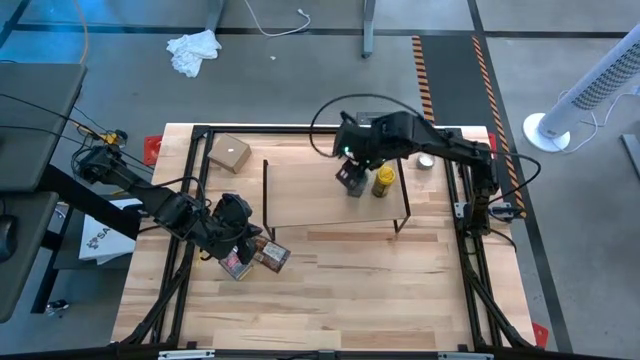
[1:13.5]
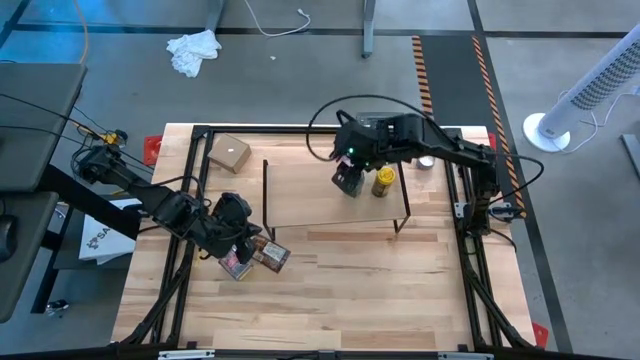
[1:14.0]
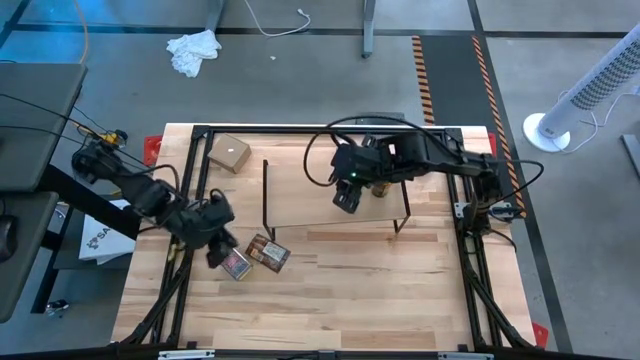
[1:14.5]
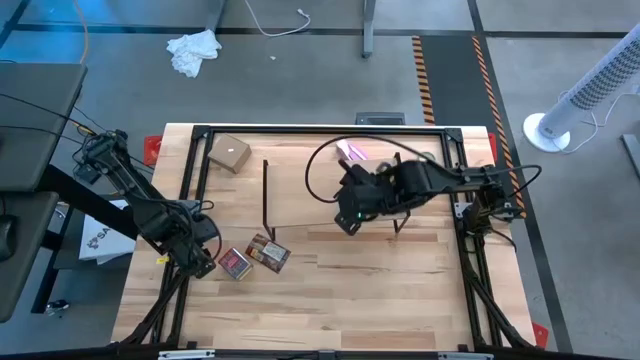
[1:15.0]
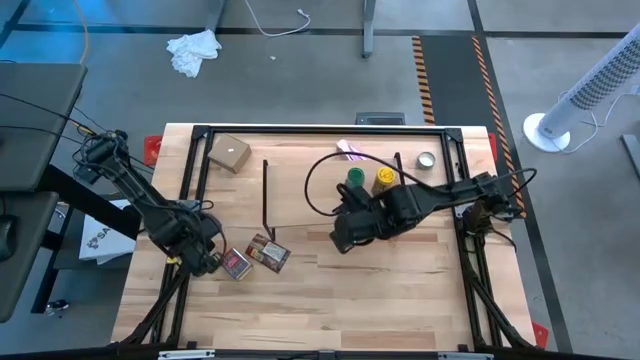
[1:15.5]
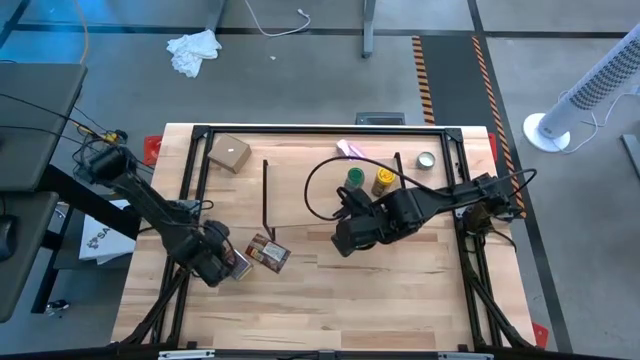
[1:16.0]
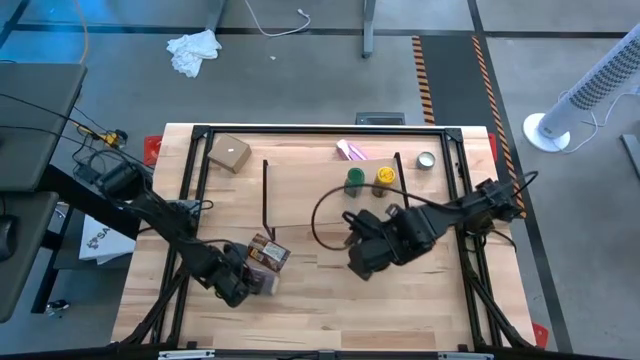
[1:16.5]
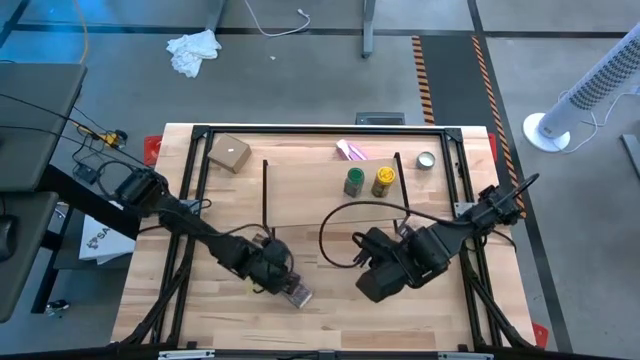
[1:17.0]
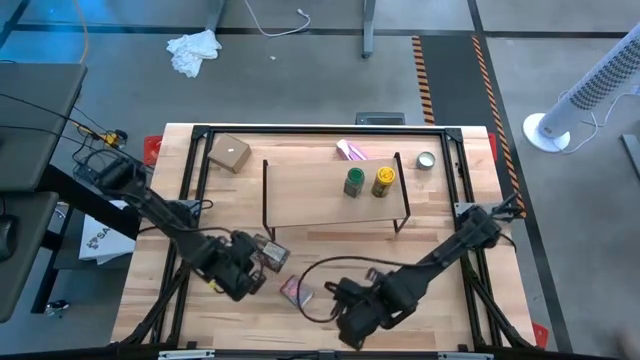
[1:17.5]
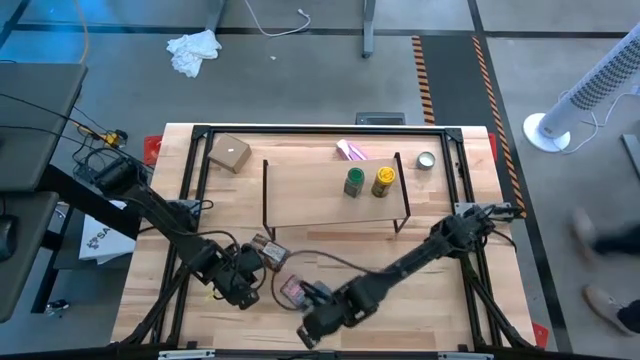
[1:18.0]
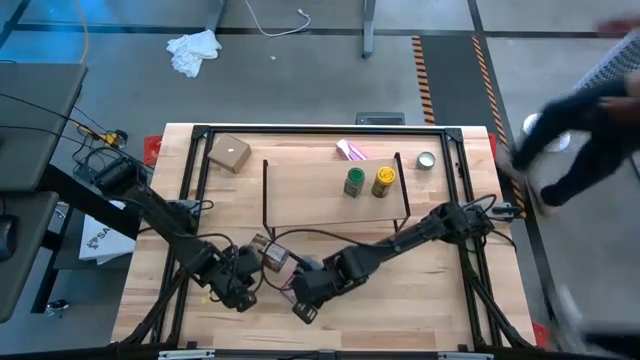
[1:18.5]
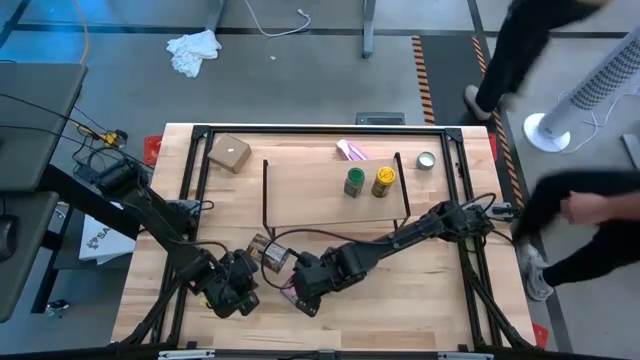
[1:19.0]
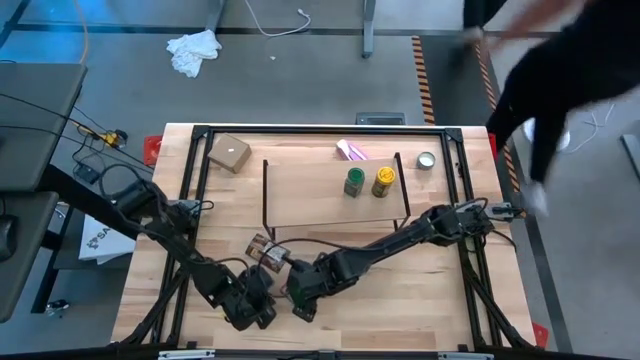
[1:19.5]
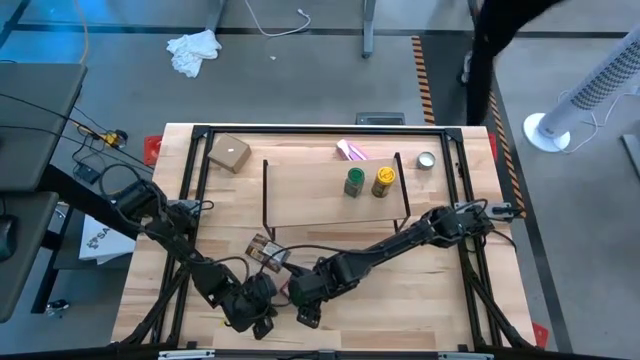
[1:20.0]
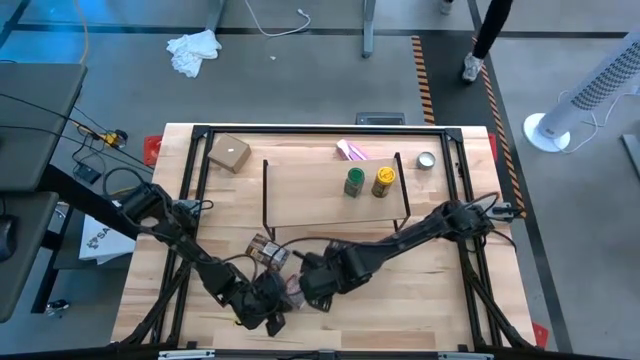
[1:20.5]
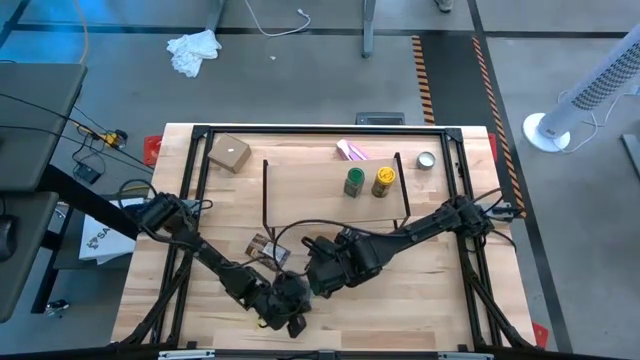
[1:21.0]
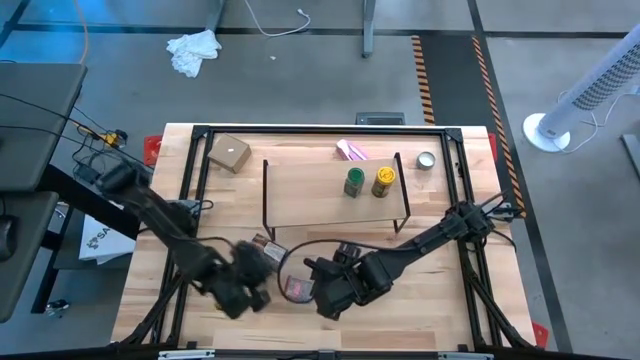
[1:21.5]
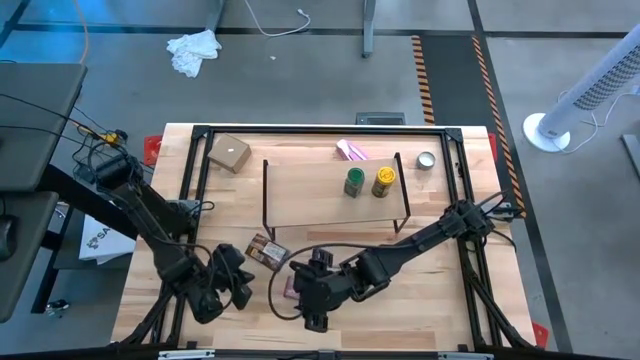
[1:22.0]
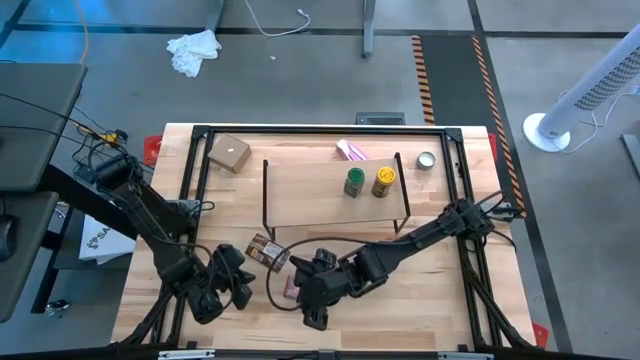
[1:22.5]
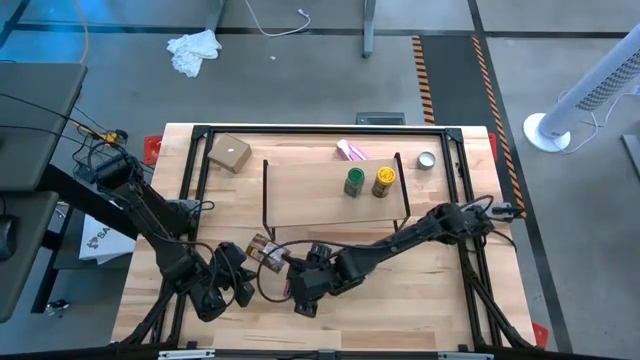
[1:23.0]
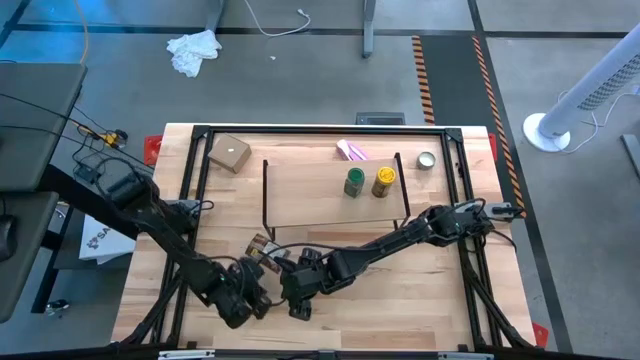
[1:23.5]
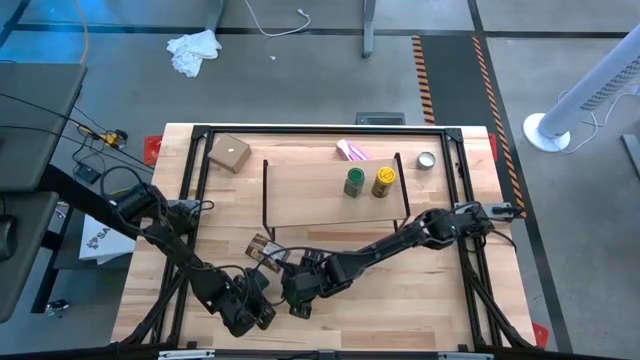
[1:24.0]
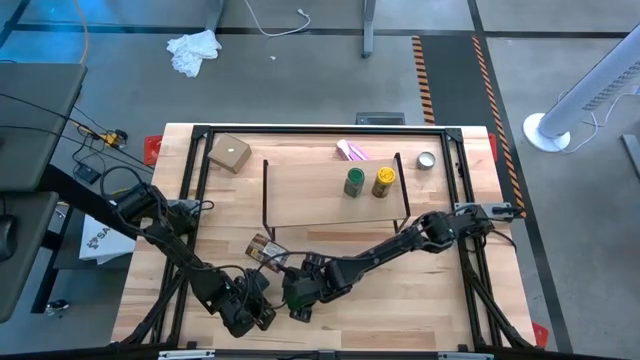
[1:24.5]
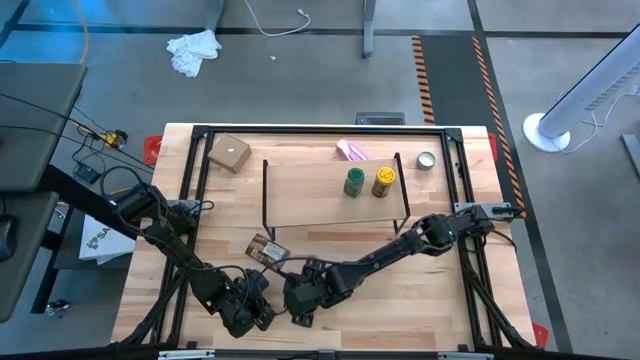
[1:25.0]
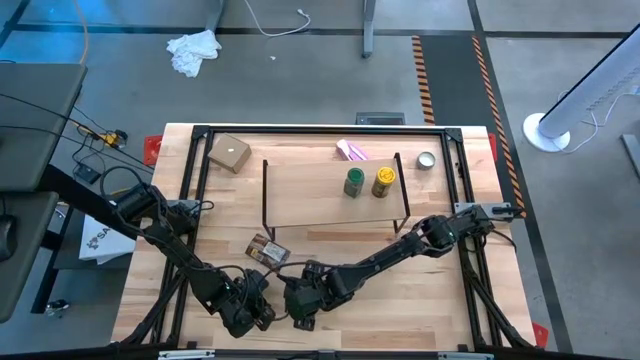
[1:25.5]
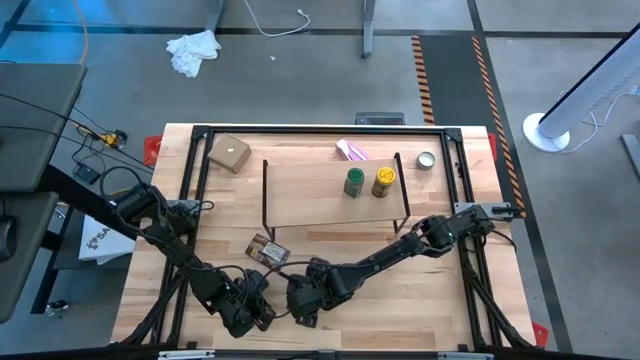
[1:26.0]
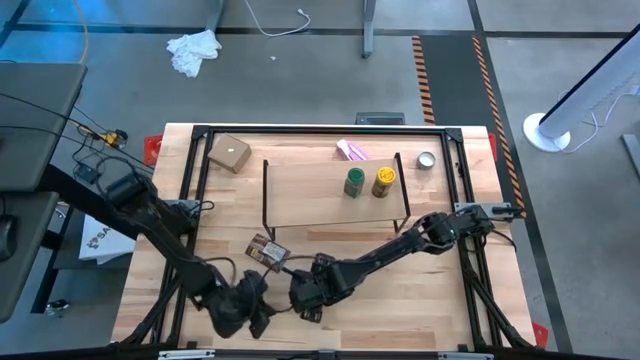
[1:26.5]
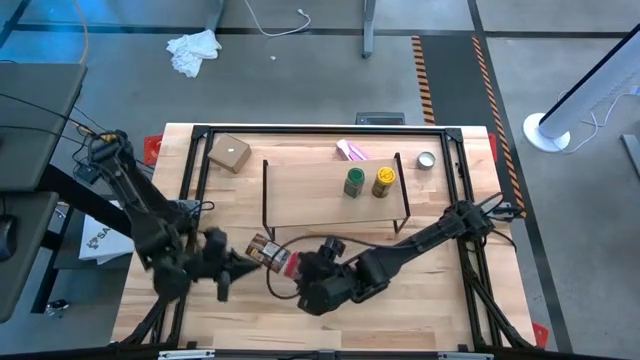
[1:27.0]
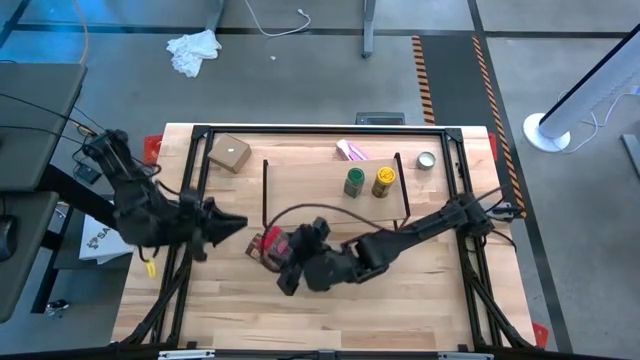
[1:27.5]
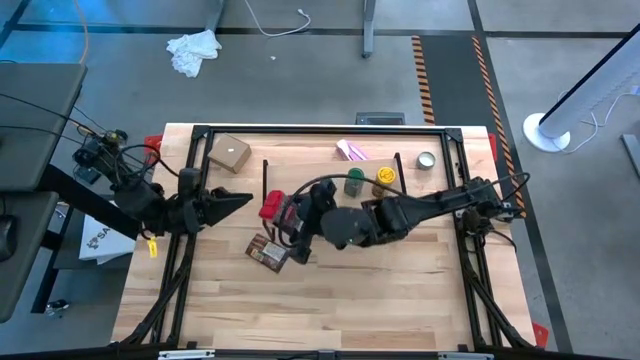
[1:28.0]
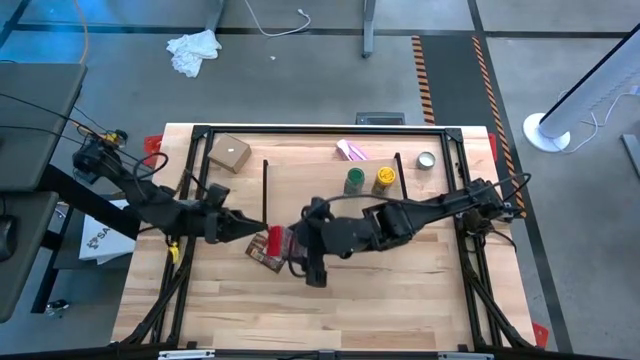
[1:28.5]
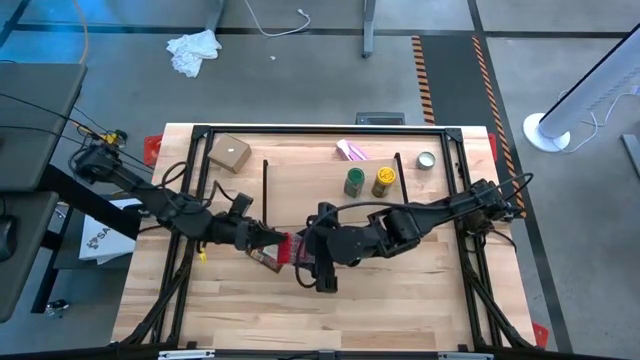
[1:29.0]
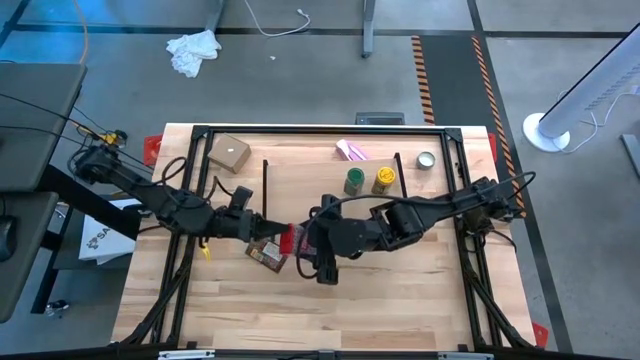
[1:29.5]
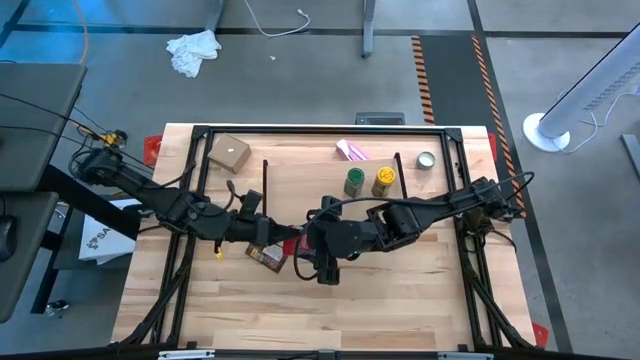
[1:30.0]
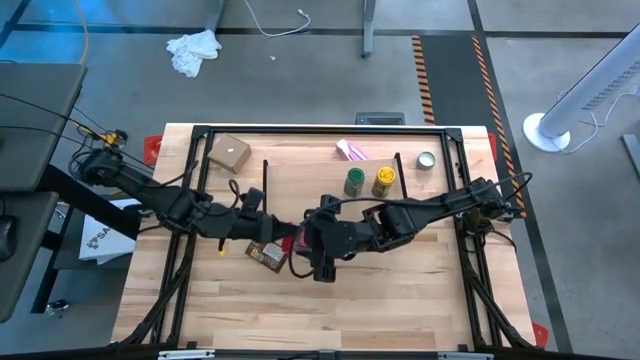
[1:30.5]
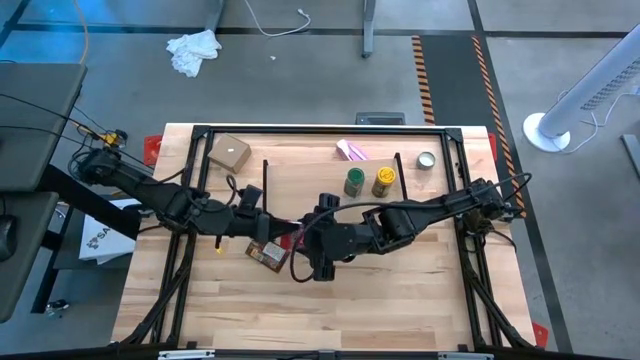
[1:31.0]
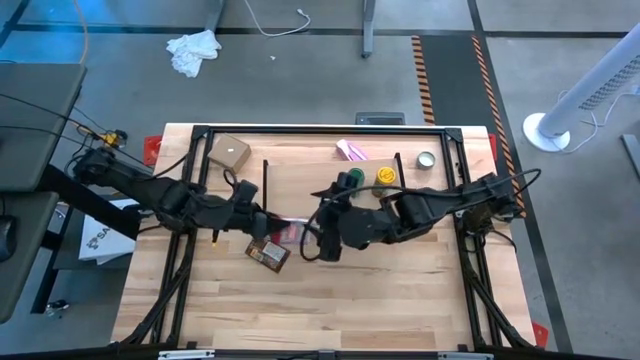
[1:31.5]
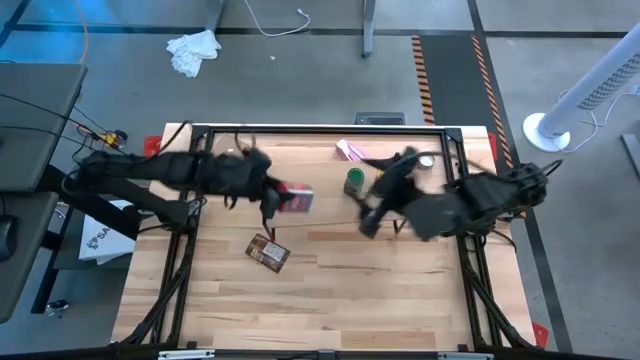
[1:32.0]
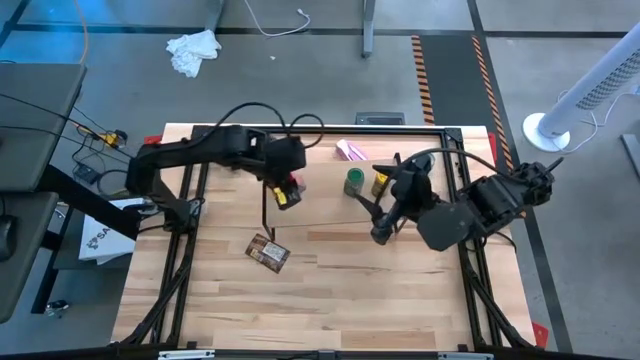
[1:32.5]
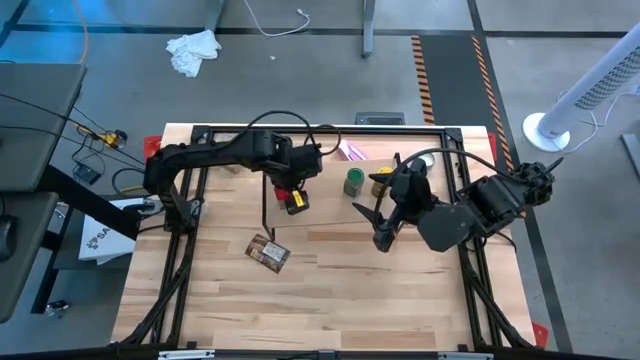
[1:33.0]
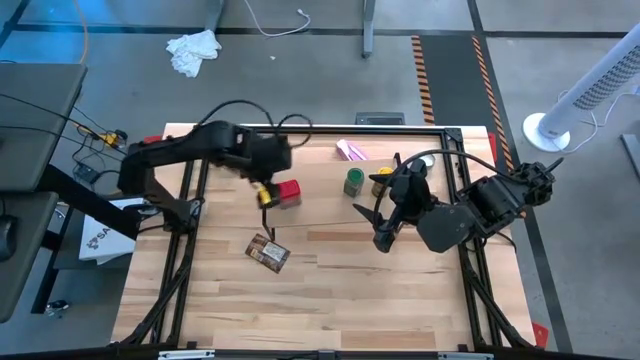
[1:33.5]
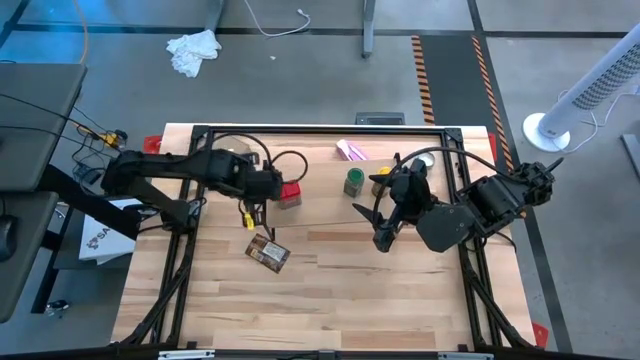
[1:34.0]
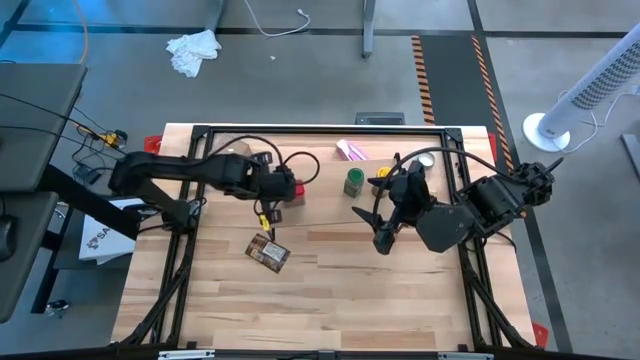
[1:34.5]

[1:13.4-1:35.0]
Task: Shelf spices
Put the red seasoning can on the shelf

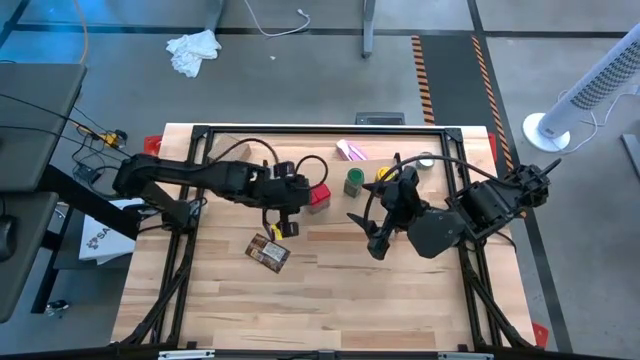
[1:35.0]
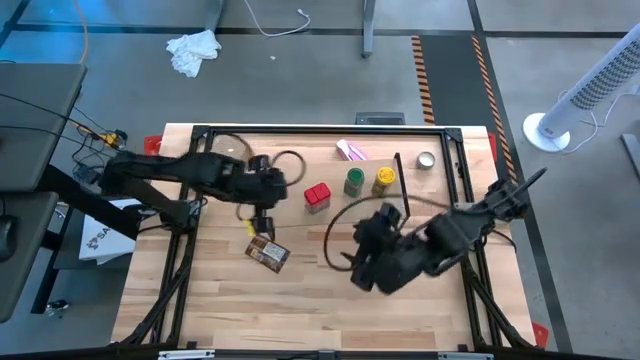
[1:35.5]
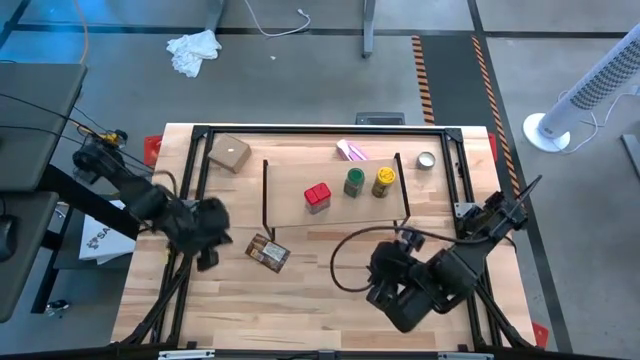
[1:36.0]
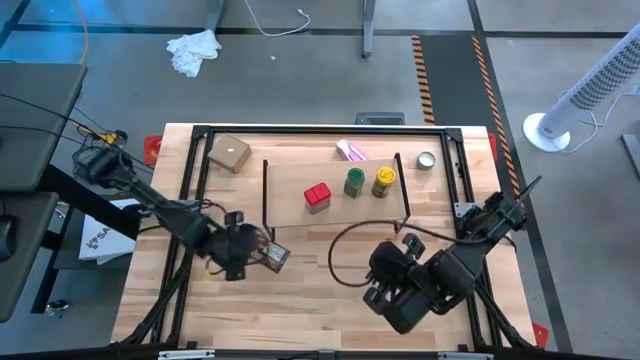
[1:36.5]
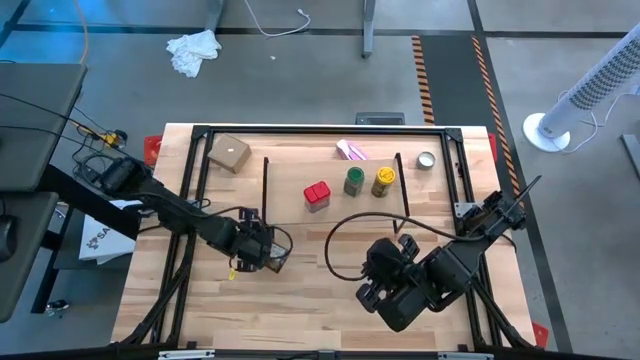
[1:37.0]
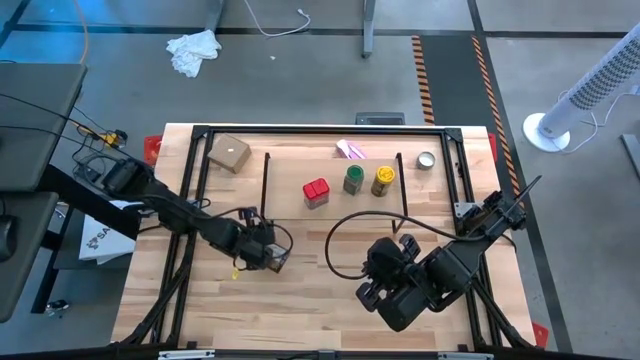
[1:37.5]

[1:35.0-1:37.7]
Put the seasoning pack on the shelf
